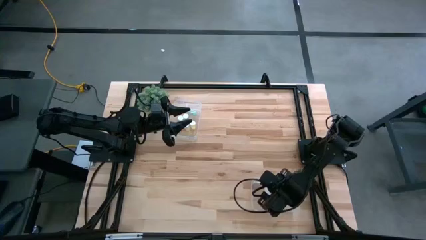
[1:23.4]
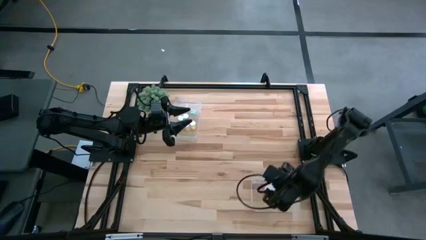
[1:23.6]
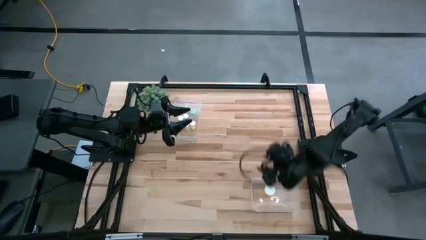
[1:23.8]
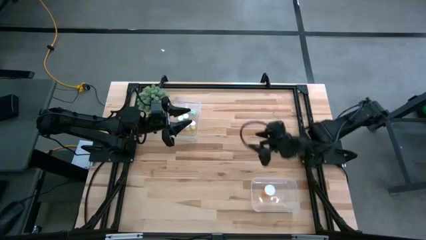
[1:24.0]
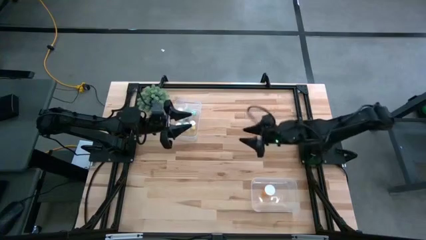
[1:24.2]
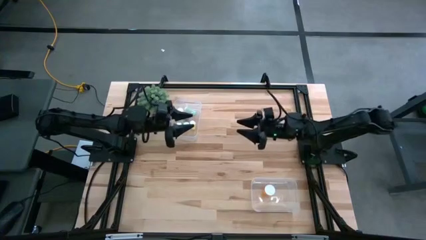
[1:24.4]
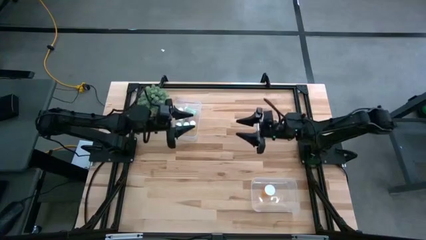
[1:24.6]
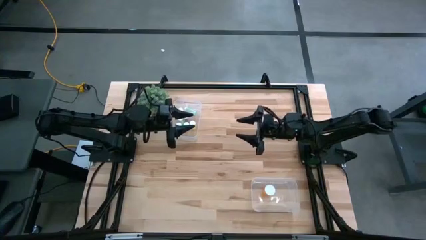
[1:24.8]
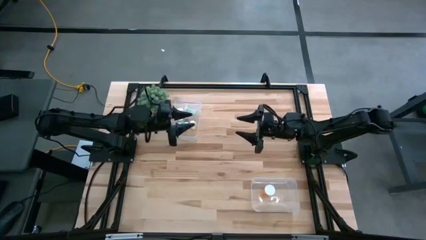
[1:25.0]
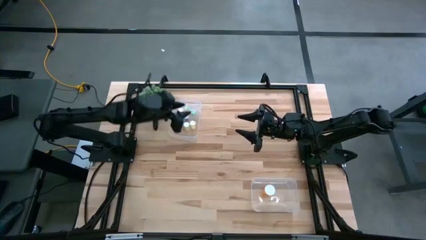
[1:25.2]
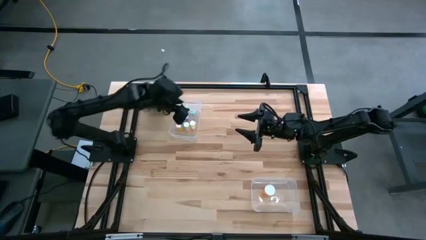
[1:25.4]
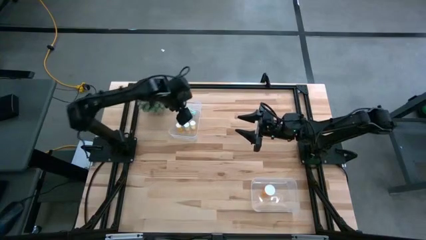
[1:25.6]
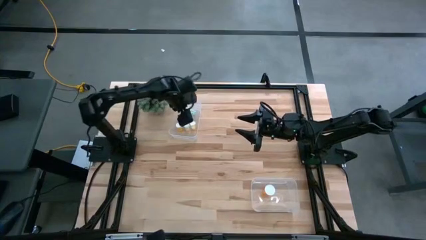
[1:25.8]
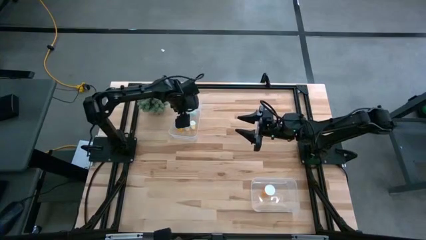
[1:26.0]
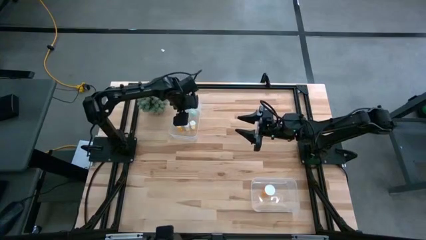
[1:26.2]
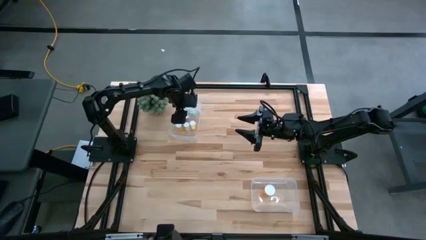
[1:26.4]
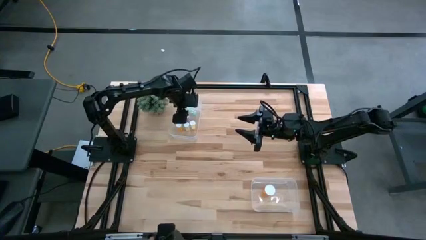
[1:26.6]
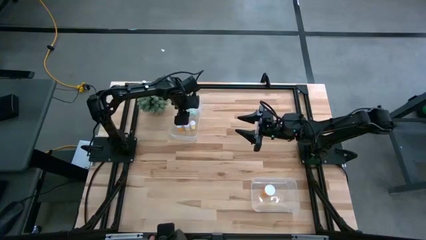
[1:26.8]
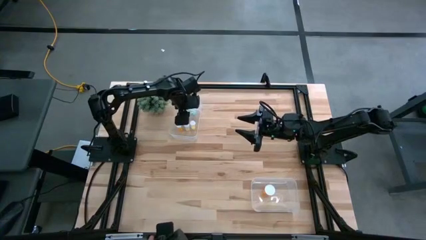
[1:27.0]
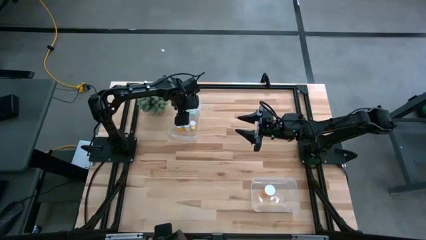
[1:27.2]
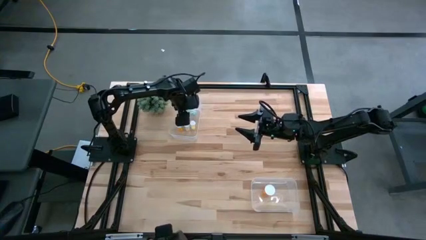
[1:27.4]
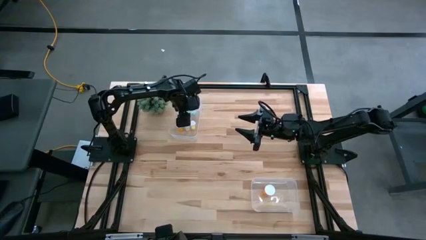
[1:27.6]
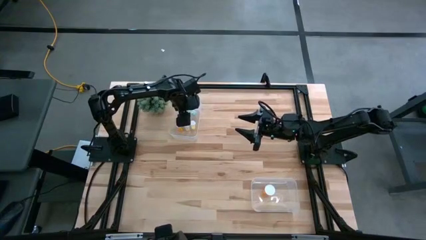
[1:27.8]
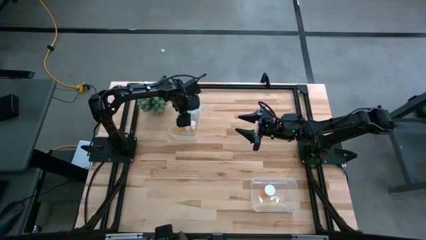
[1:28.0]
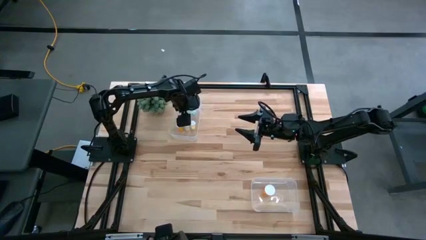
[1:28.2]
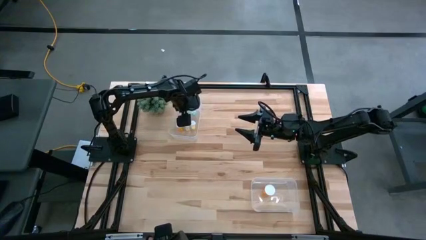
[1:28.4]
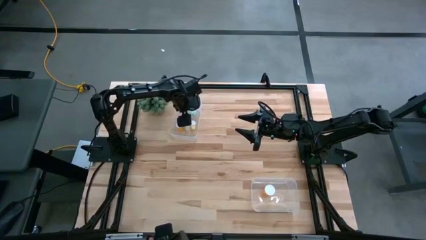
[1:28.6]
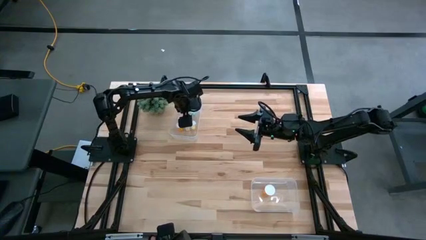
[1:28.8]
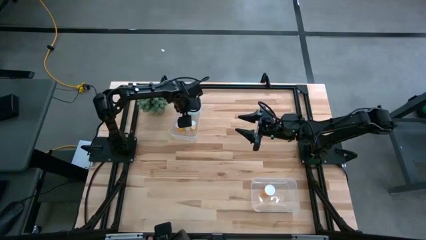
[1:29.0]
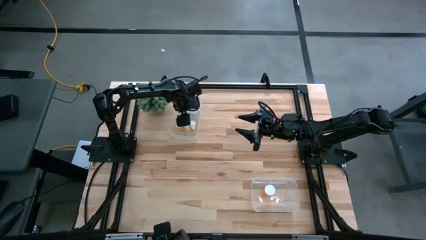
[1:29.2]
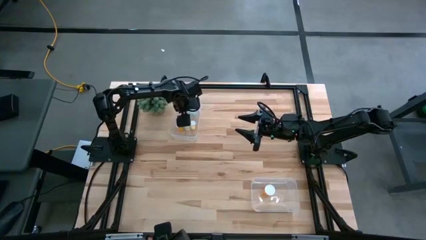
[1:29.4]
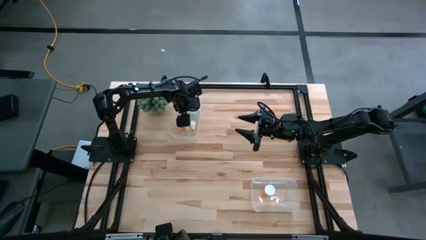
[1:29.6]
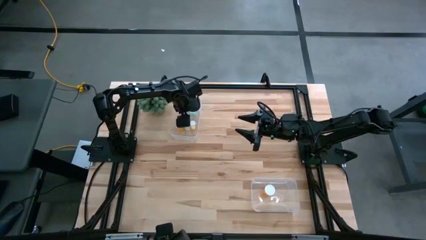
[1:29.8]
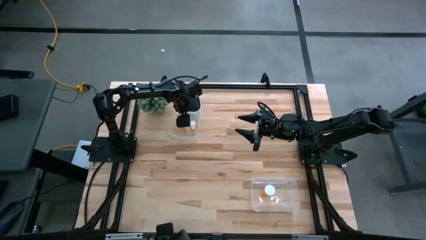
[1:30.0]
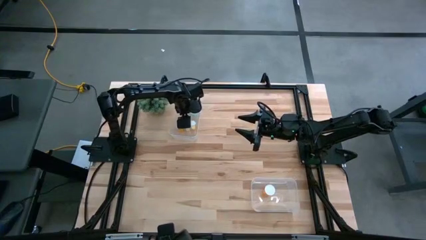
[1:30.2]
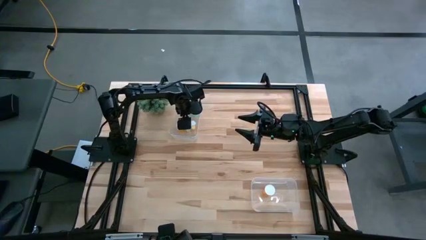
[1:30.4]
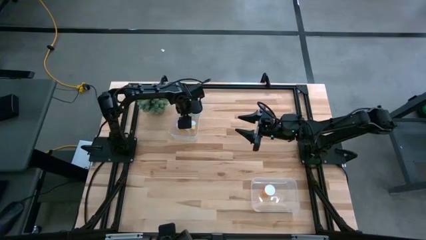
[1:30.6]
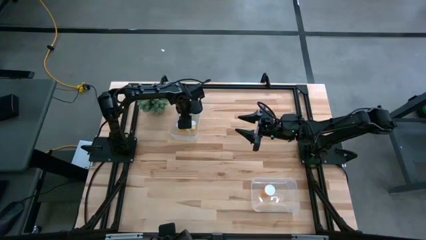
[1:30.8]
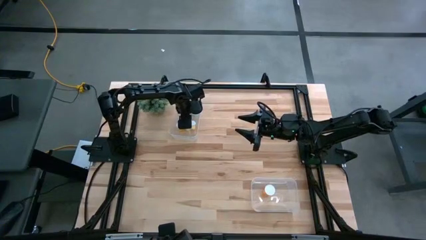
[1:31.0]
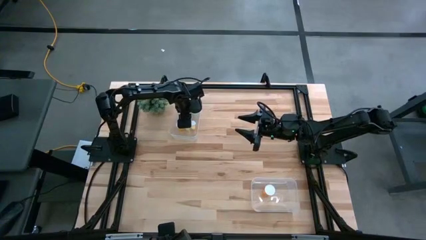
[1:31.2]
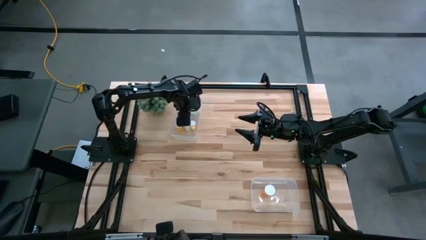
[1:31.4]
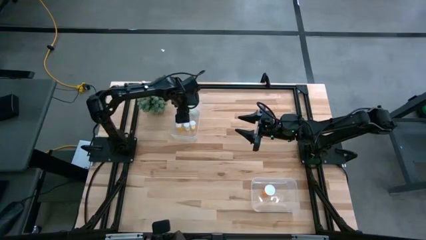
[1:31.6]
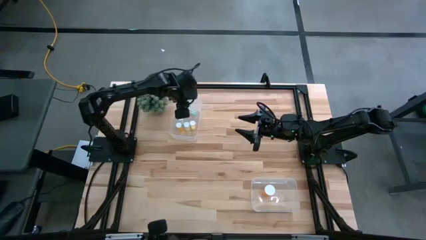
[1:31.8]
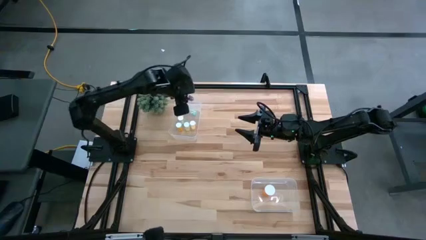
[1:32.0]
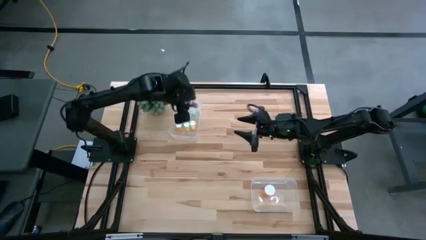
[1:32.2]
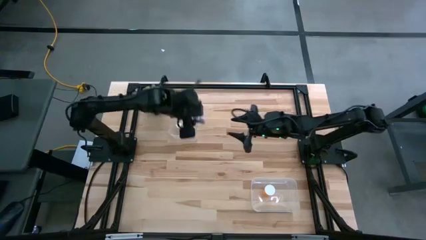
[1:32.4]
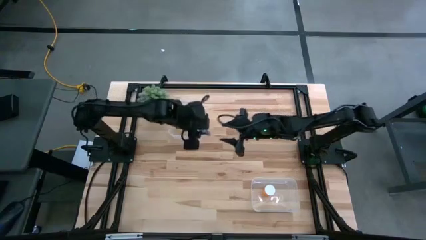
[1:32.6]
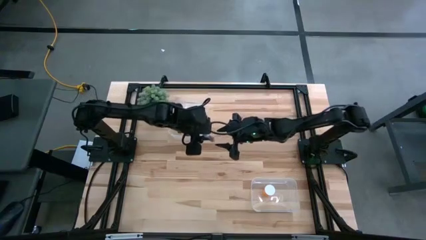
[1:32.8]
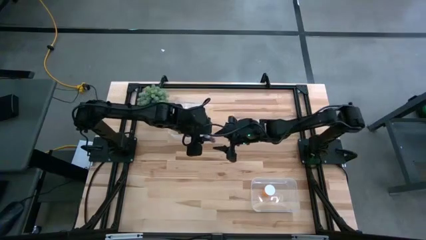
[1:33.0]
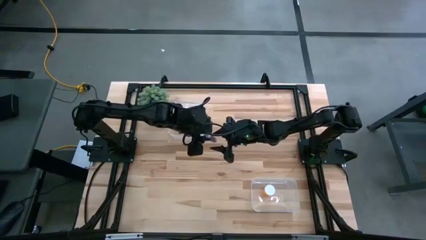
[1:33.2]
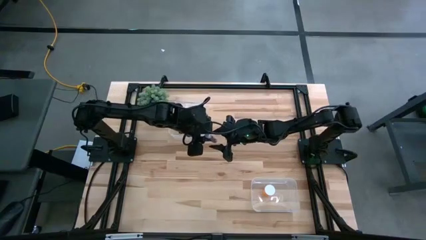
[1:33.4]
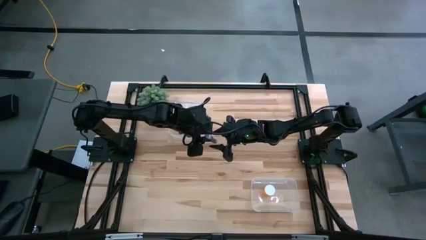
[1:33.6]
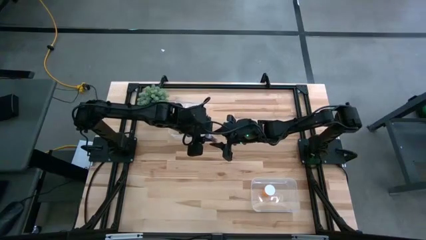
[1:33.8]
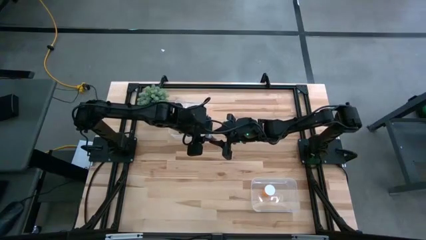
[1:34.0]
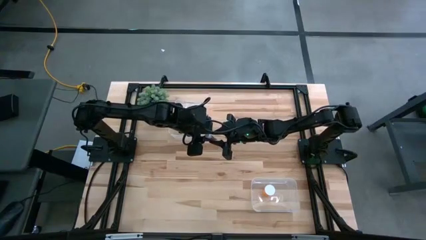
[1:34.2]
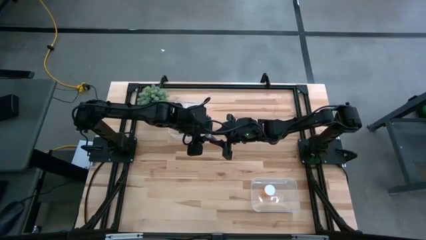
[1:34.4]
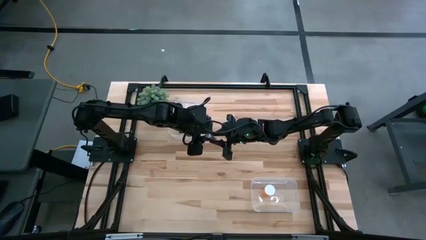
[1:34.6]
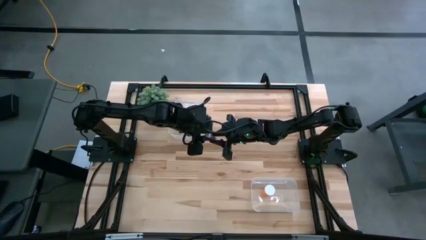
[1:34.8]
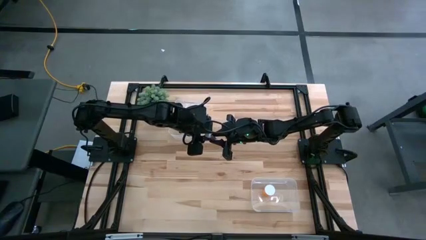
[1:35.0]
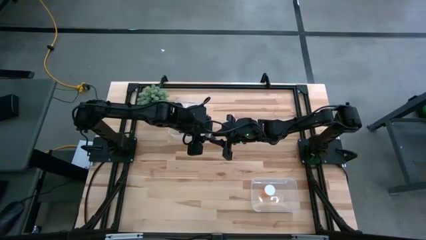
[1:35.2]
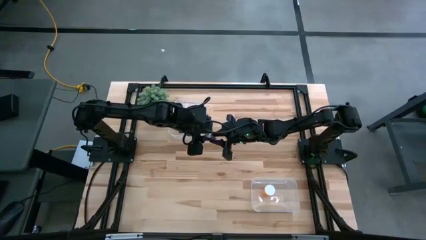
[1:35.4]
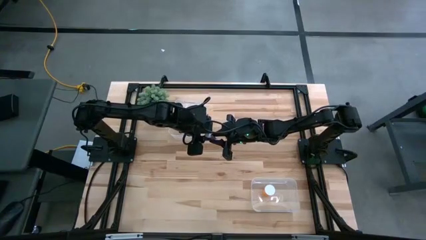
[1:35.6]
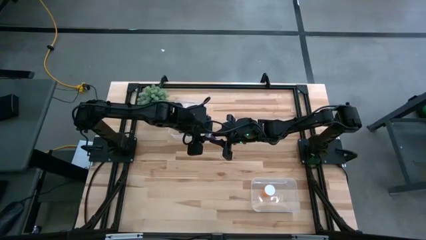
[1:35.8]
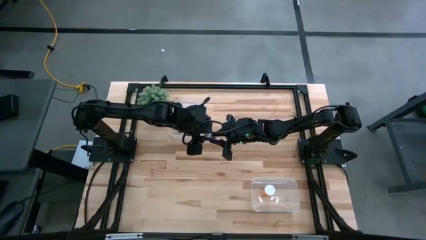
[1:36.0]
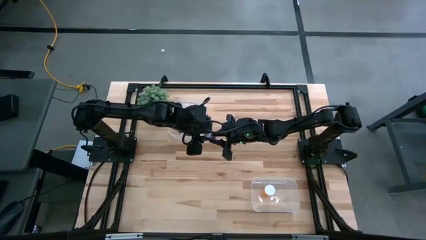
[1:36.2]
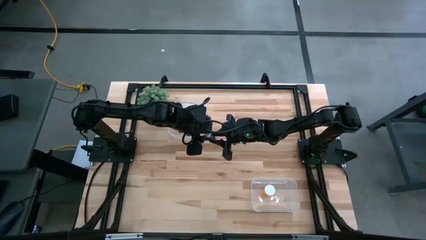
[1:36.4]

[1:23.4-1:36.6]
Task: Pick and place medicine bottles into bin by pill shape (circle, oval)
Put the blue capsule bottle into the bottom transparent bin

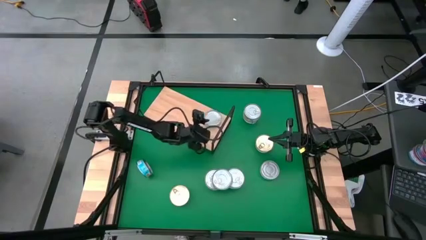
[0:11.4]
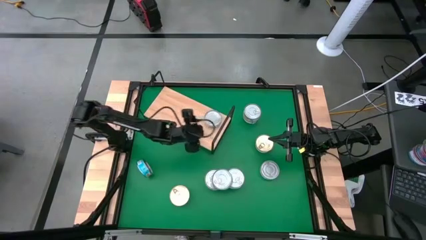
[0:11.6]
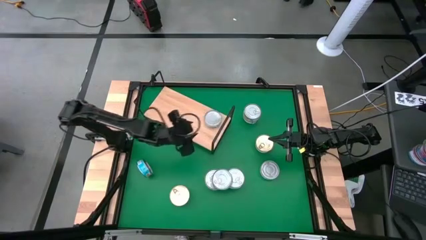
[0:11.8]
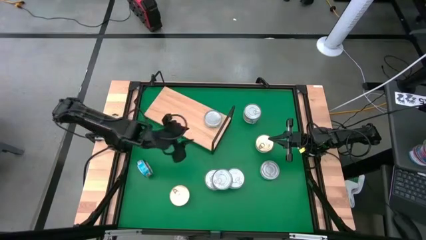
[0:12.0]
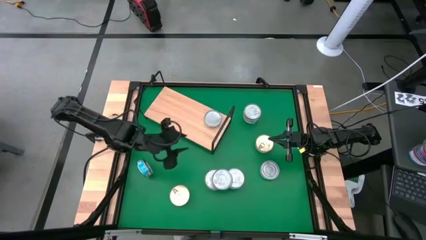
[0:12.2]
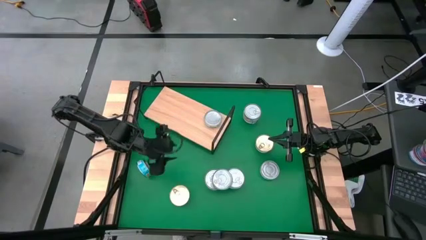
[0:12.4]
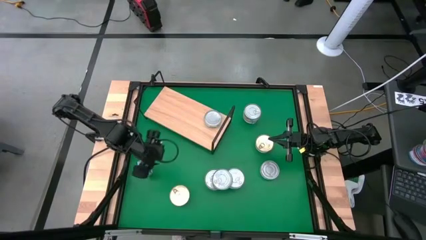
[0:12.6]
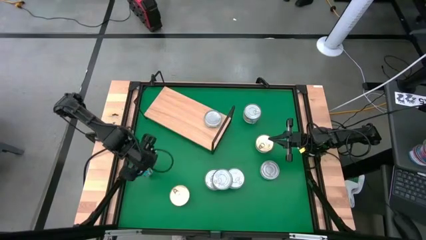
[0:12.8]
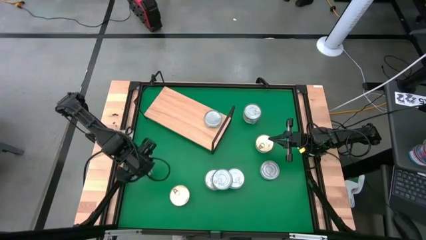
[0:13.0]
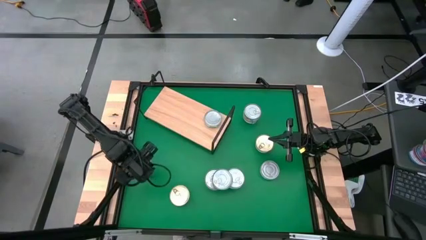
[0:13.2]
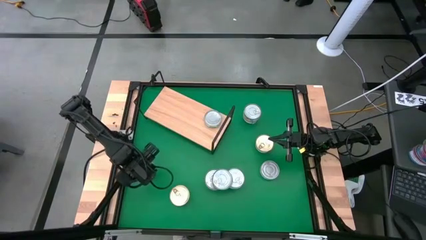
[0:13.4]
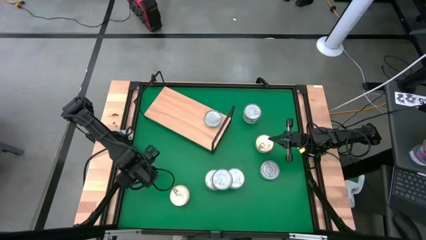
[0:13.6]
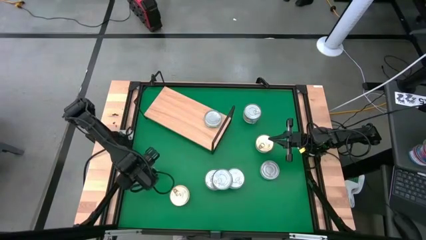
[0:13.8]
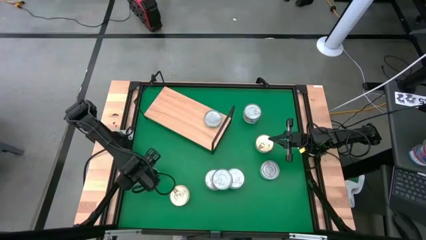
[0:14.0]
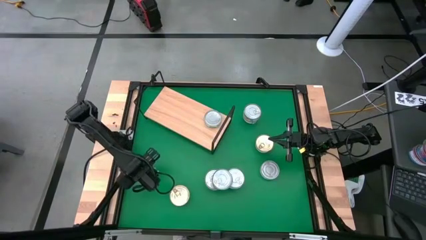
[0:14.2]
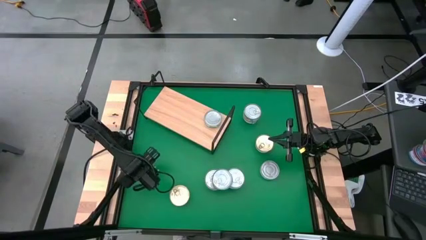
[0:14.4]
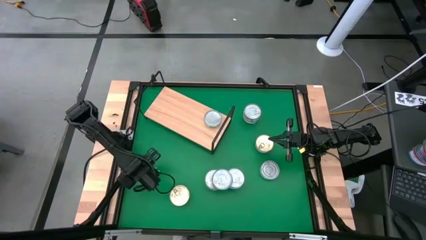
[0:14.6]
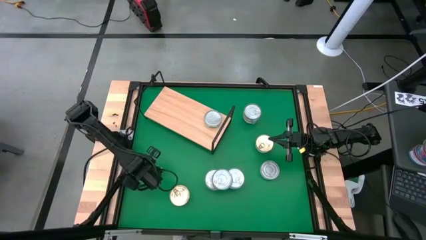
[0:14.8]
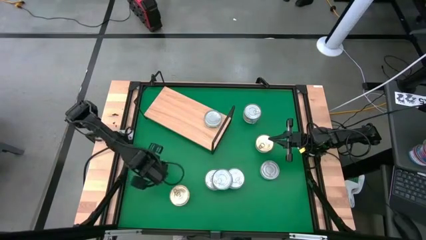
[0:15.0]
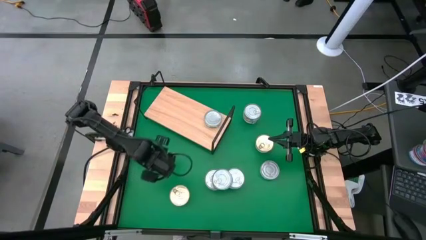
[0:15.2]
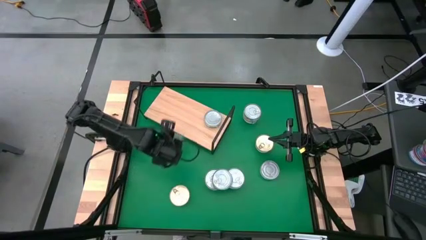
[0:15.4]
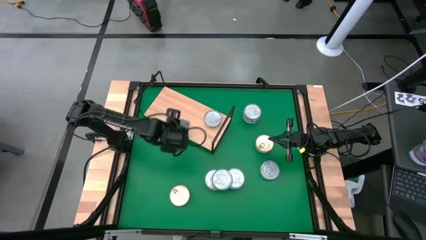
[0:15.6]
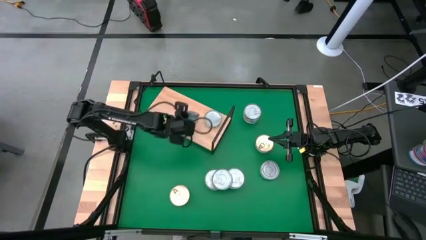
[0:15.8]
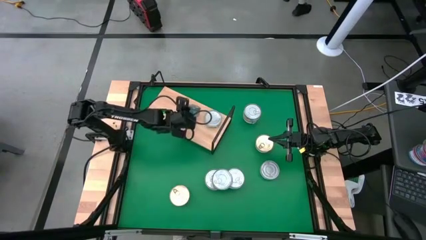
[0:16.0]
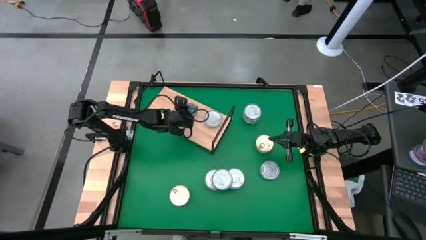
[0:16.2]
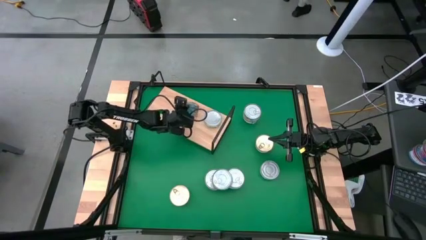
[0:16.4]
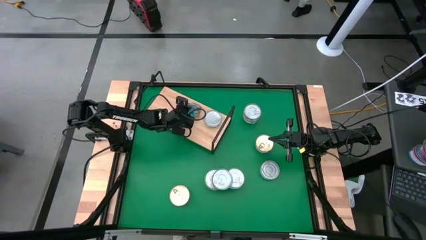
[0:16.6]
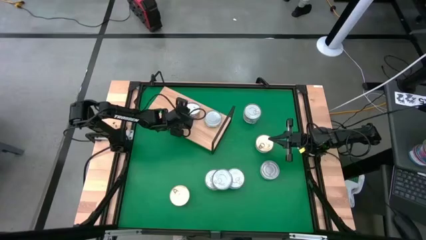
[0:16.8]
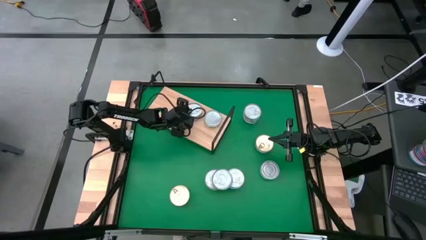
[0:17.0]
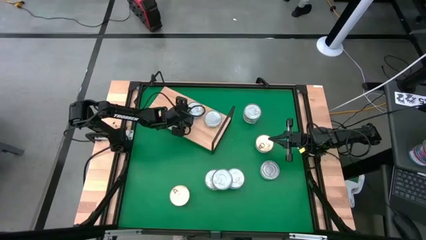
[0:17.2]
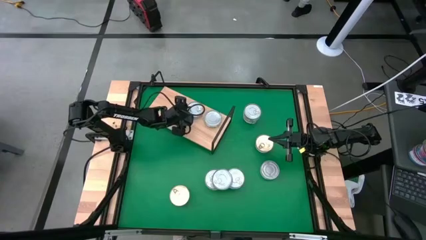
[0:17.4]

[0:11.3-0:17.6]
Task: Stack canned seafood by type on shelf
Put the sky blue tuna can on the shelf
